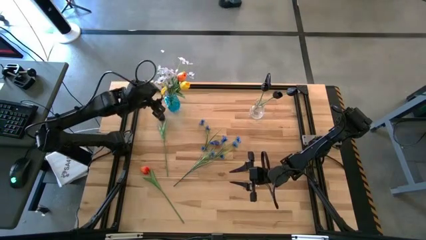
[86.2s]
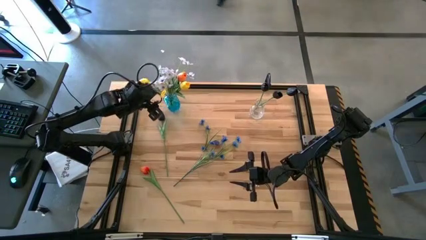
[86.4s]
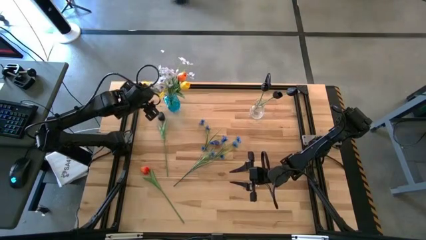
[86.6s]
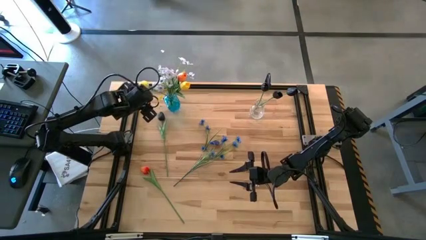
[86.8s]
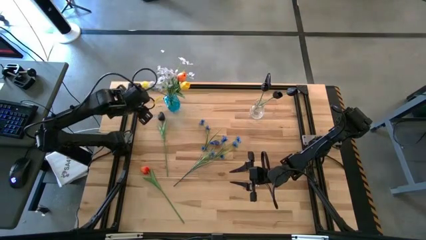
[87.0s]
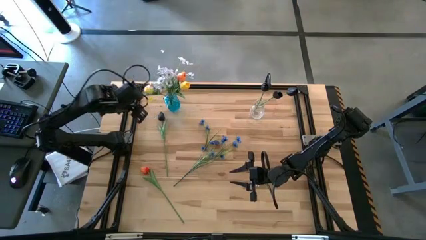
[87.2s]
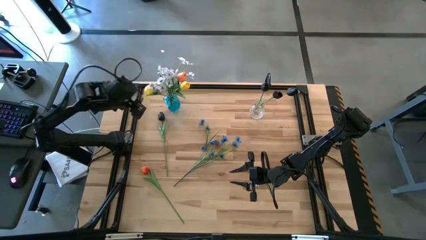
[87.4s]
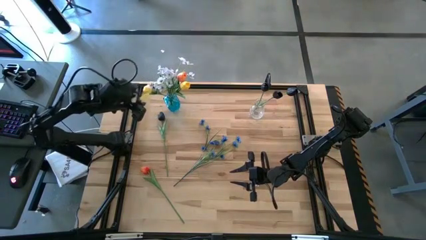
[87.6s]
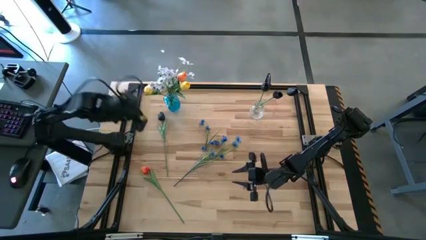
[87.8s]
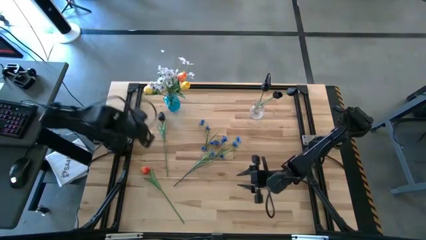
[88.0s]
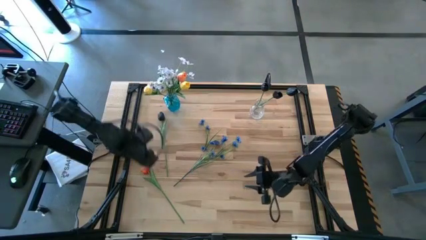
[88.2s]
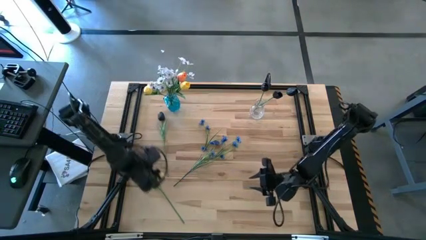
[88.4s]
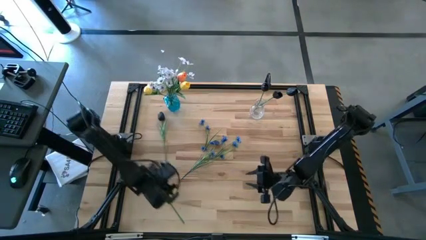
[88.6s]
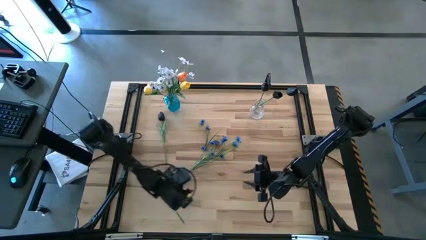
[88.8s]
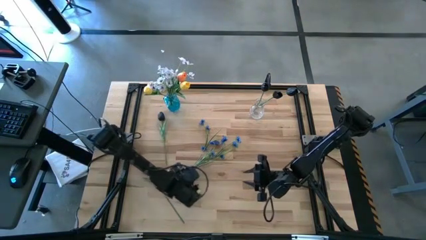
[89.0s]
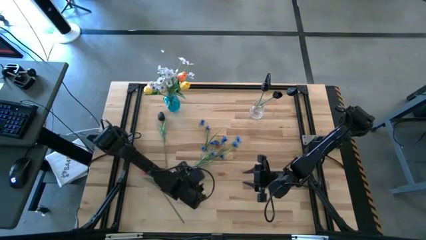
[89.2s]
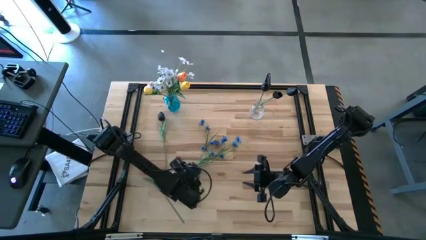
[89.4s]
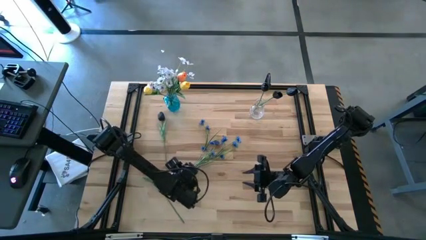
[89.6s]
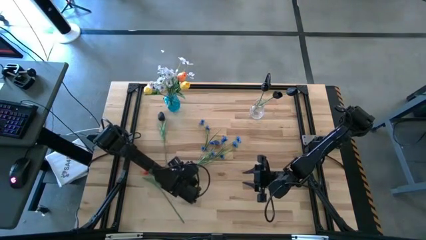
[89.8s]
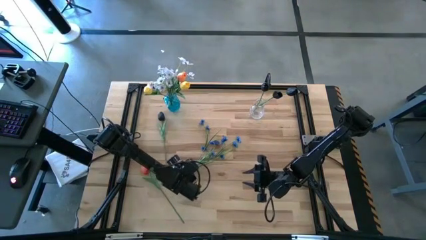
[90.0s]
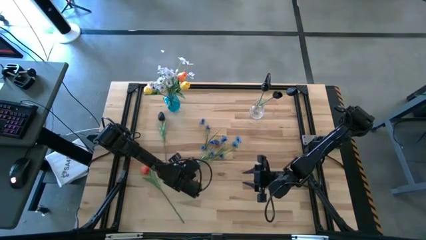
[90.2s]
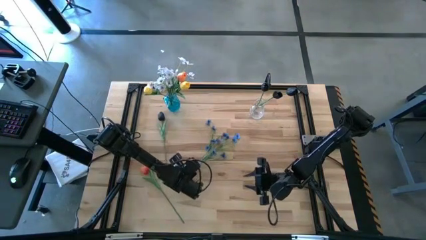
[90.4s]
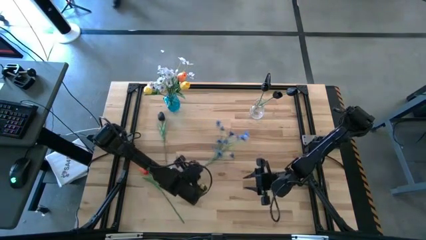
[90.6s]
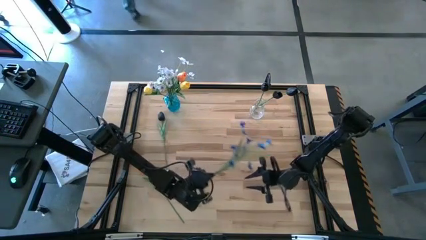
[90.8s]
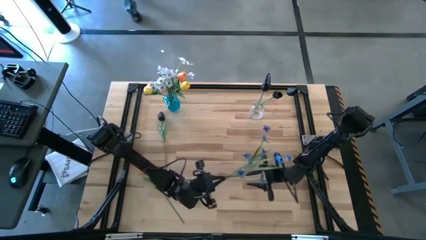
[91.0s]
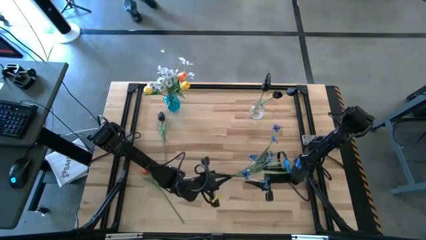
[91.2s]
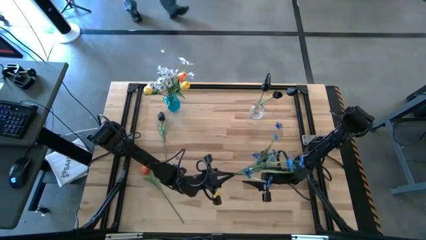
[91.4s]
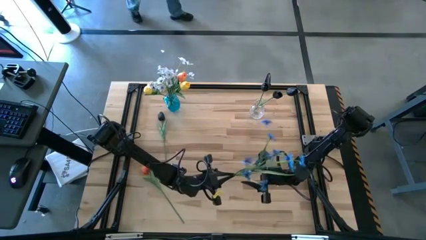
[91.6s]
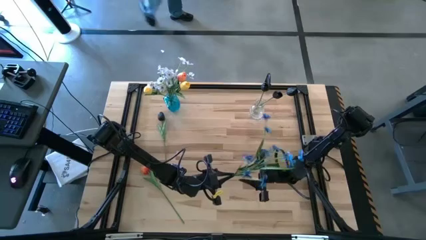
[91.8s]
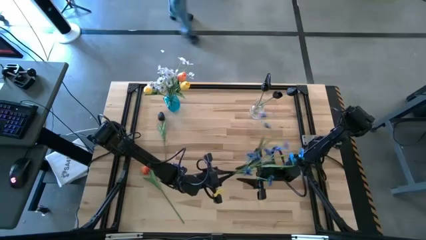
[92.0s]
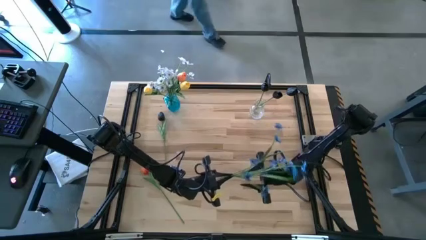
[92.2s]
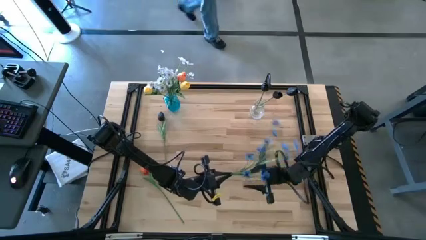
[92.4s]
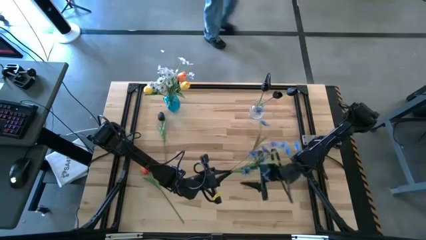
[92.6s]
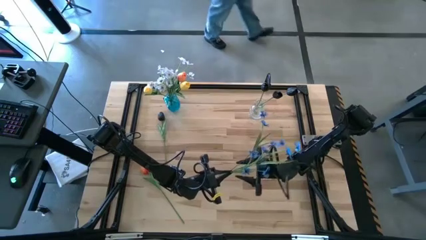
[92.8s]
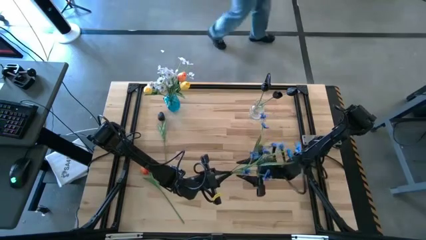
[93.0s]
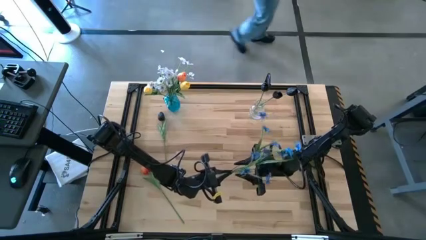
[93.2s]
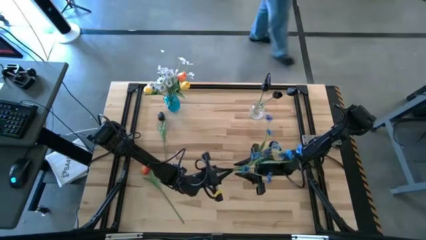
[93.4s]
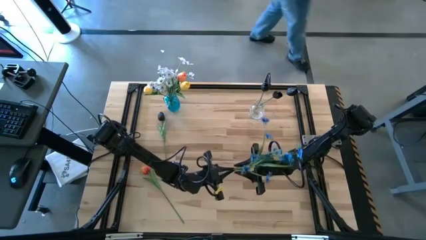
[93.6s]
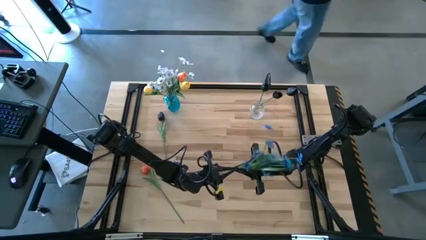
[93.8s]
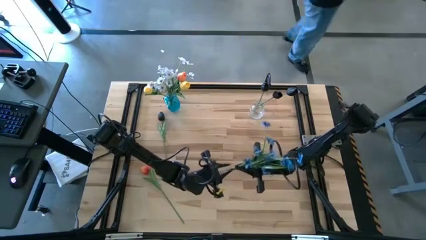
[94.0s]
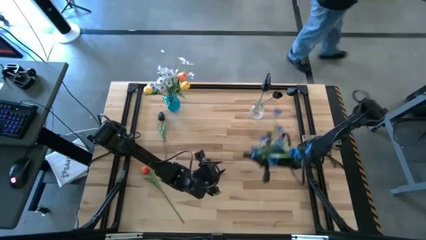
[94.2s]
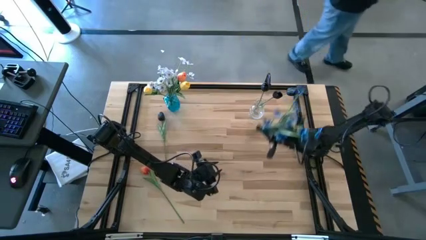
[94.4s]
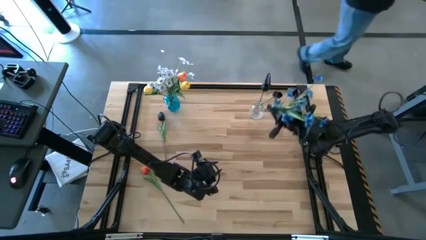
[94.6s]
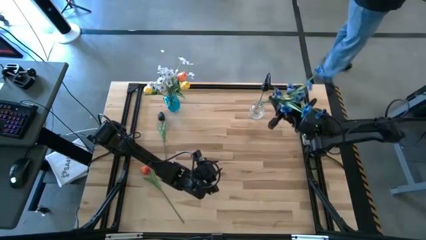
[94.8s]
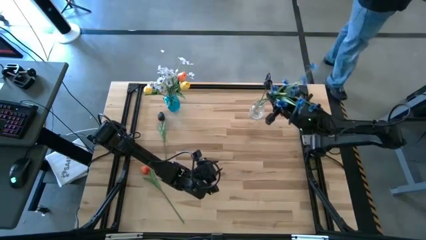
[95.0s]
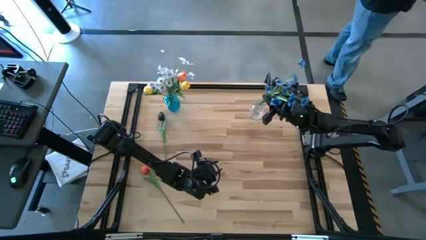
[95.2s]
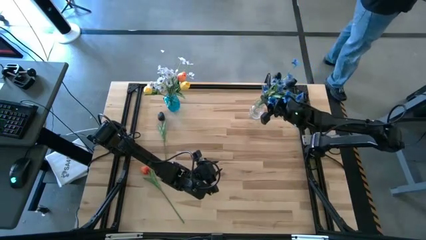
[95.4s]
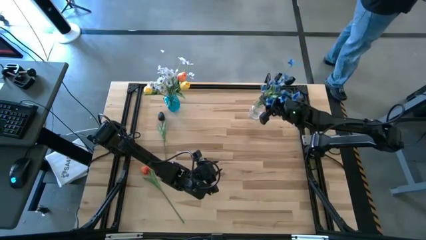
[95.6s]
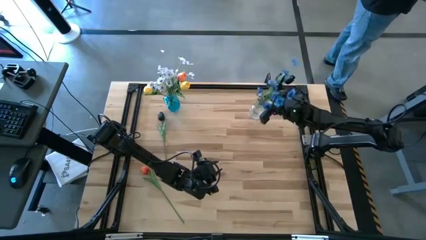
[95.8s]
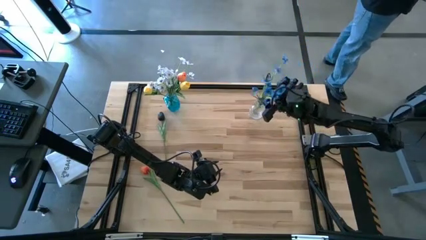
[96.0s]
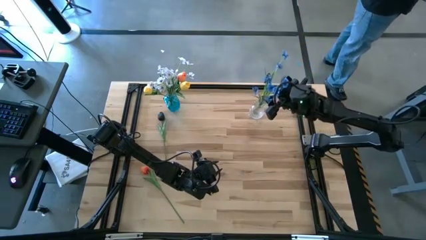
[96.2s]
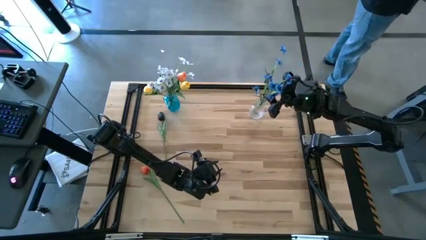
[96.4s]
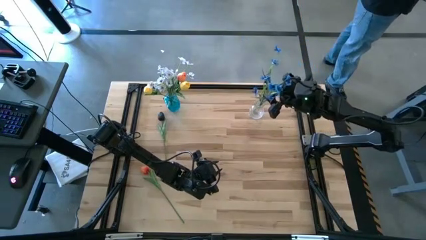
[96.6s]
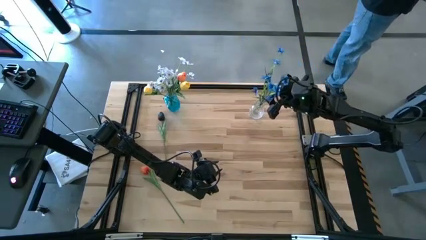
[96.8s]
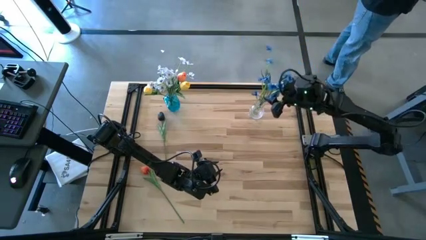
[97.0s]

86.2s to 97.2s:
Task: Sort flowers into vase by color
Put the white flowers into the transparent vase

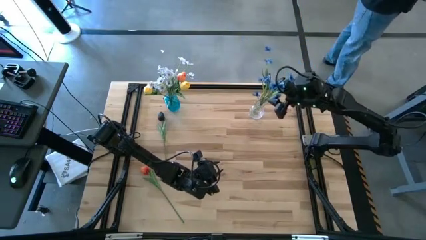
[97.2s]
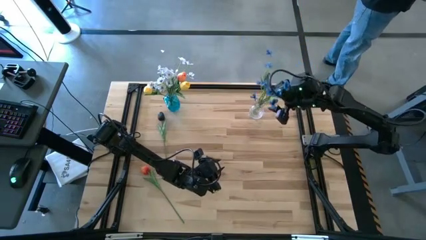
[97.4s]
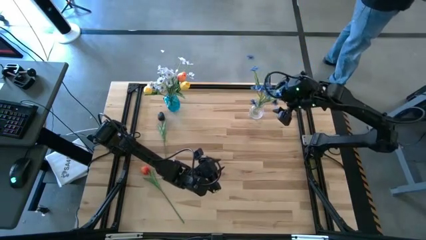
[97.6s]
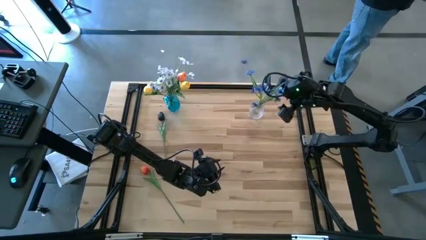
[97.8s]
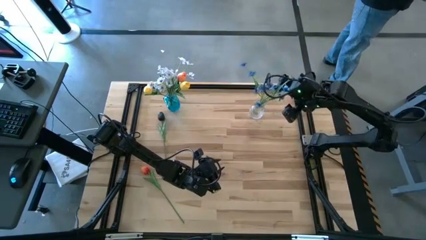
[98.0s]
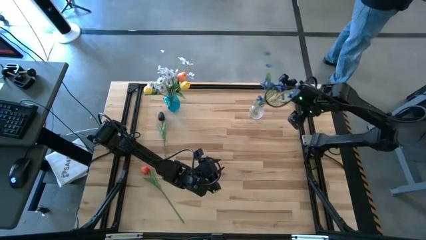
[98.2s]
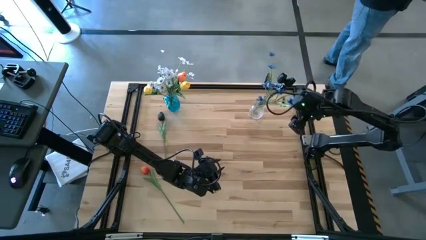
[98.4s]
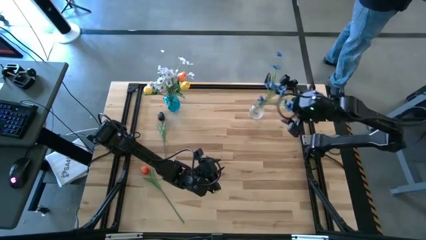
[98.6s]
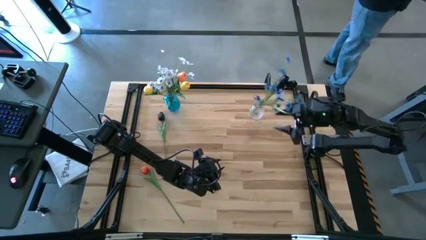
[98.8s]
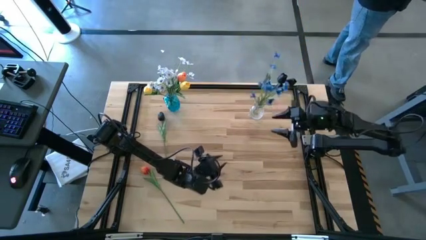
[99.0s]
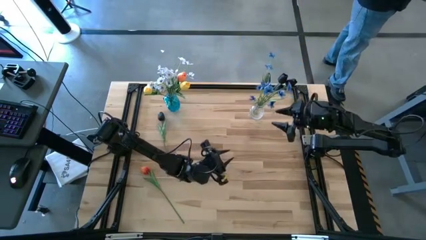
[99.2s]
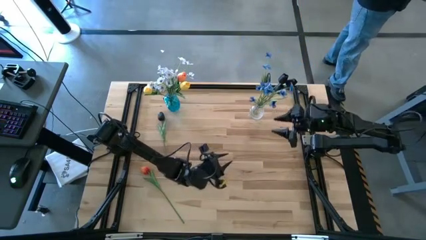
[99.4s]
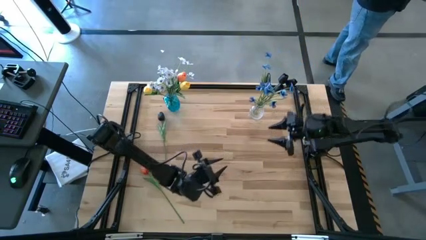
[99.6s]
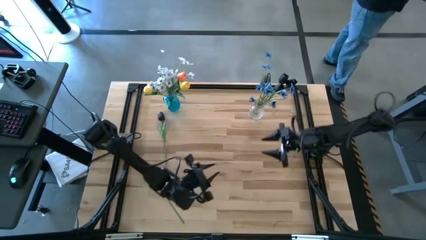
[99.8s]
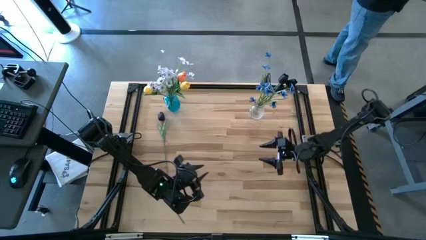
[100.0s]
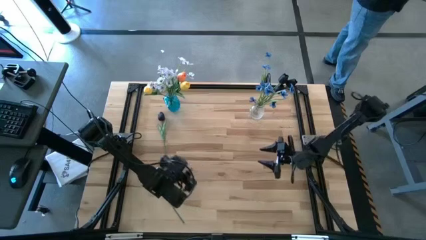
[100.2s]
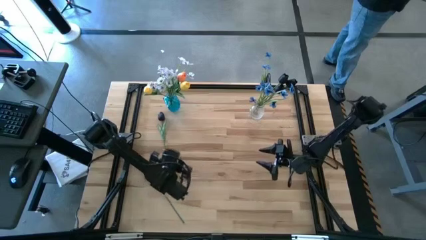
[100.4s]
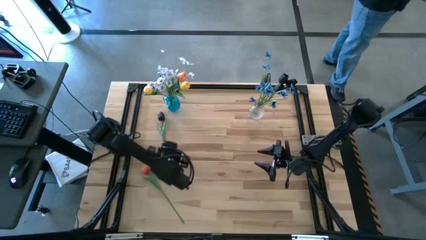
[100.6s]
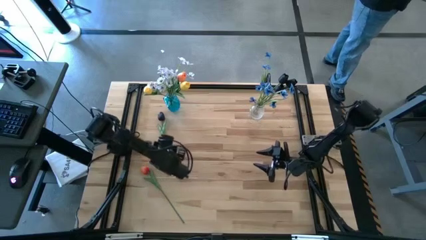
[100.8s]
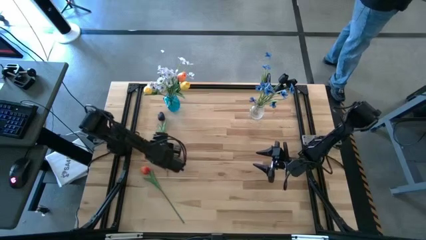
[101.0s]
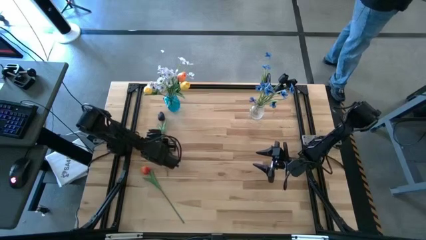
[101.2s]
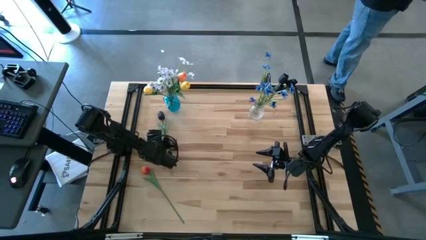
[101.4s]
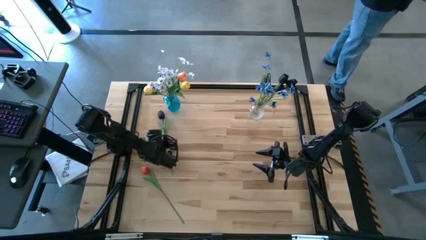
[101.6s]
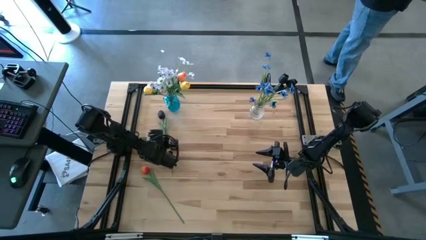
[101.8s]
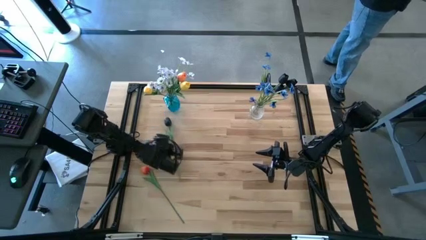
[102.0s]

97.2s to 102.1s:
Put the black flower into the transparent vase

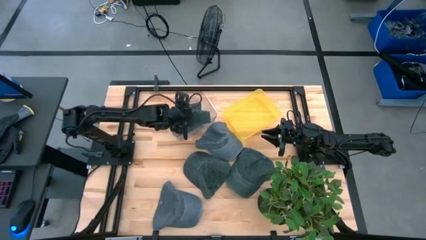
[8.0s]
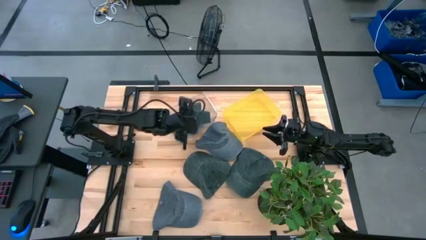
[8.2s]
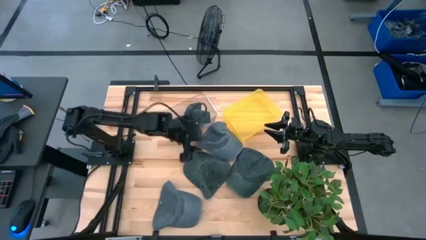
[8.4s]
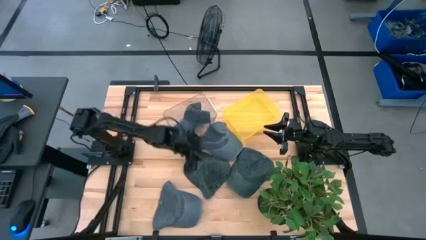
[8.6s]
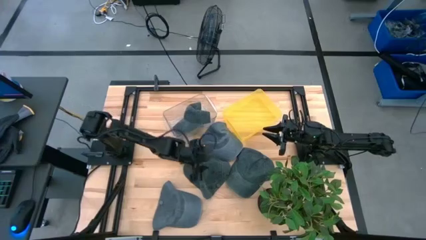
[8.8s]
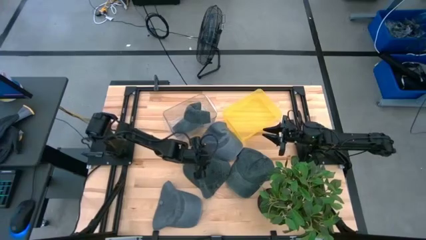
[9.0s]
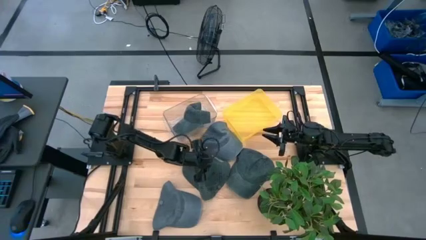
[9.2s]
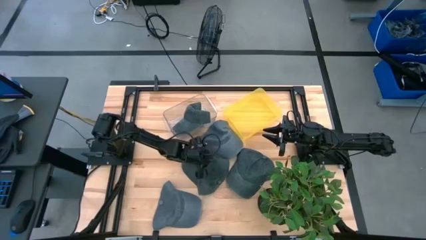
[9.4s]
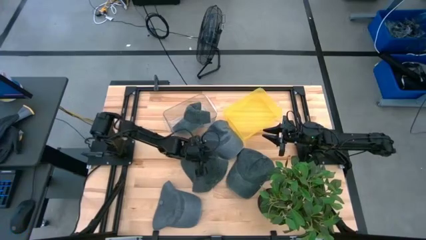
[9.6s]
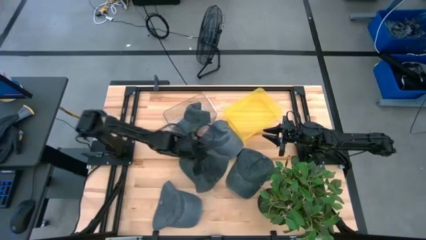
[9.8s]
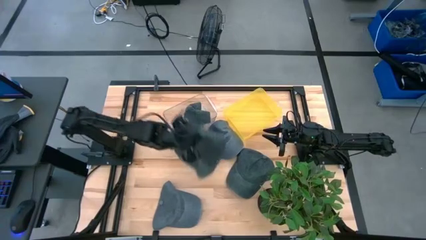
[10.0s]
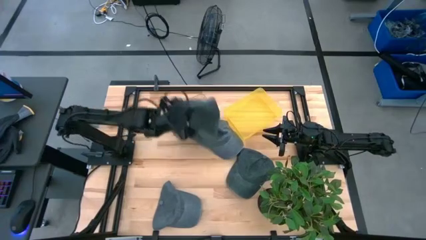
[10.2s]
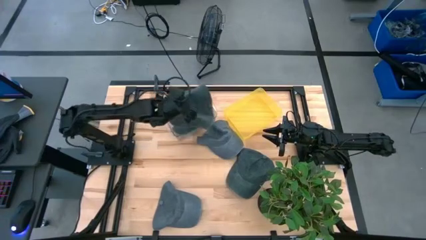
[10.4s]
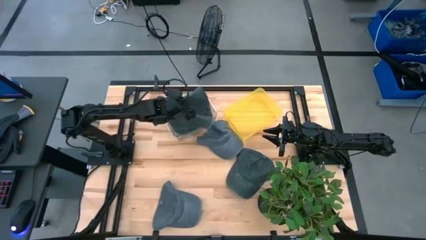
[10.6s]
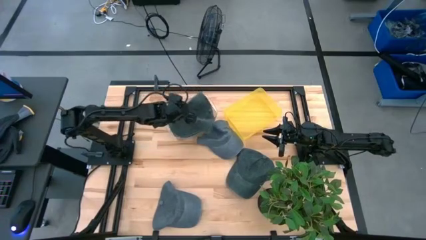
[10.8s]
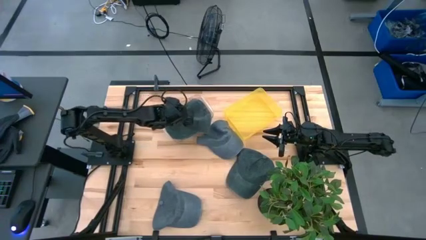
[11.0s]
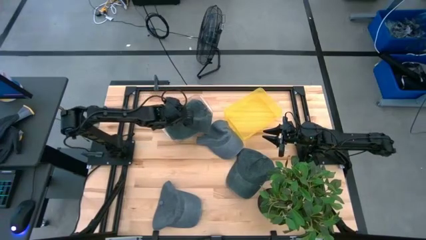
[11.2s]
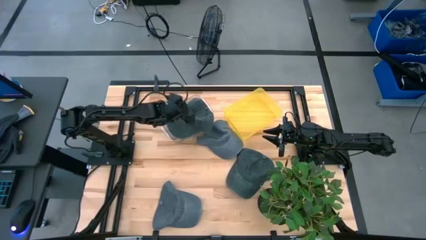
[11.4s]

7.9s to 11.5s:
Task: Pick & Place hat
Put the left black cap into the transparent bin
